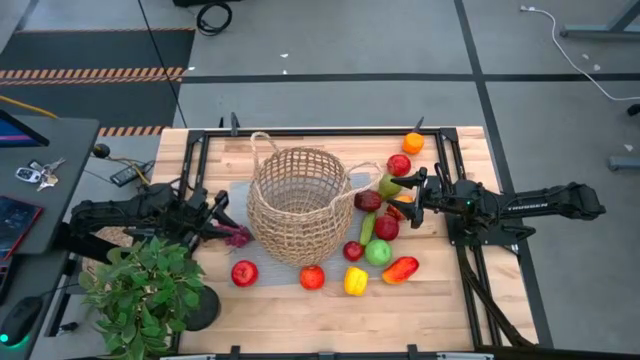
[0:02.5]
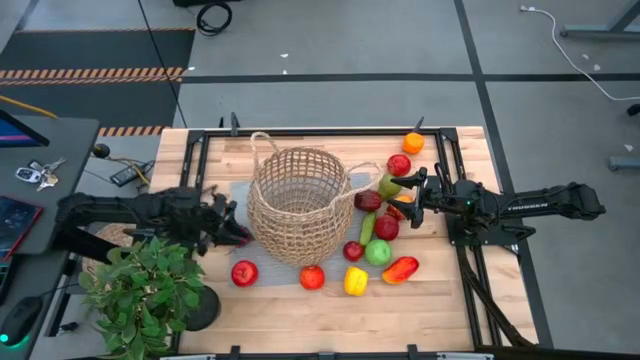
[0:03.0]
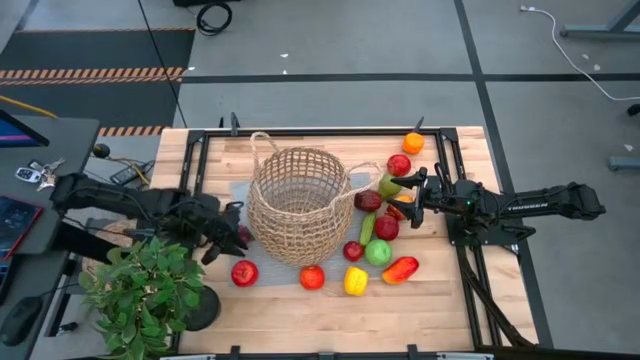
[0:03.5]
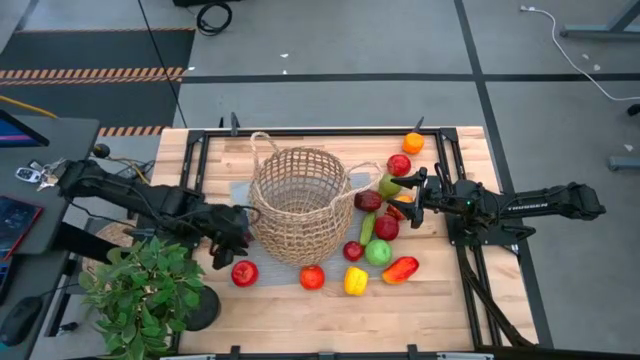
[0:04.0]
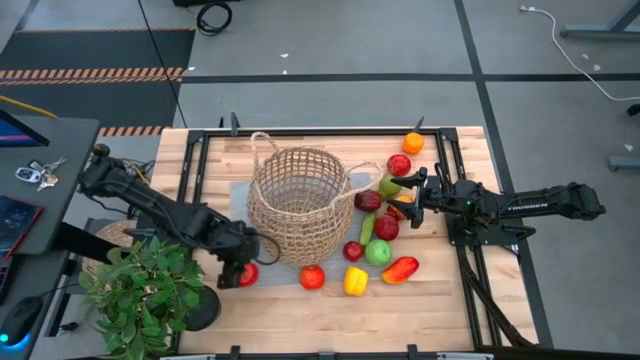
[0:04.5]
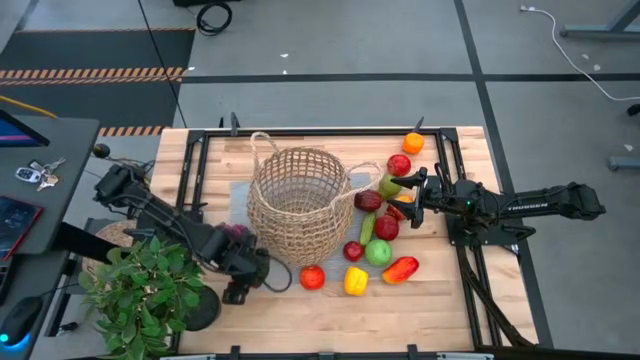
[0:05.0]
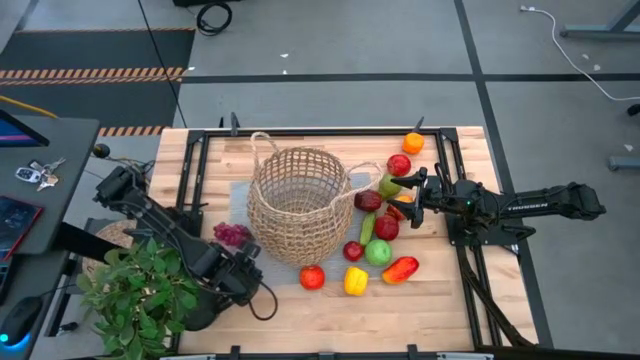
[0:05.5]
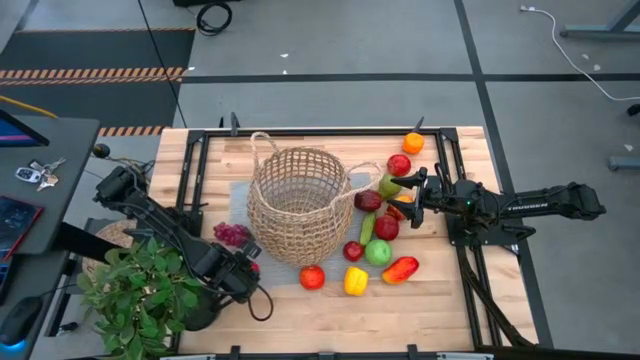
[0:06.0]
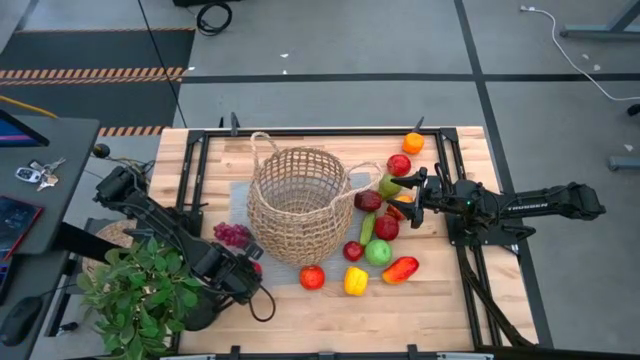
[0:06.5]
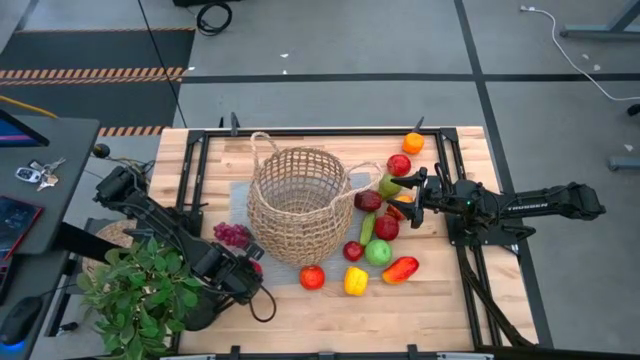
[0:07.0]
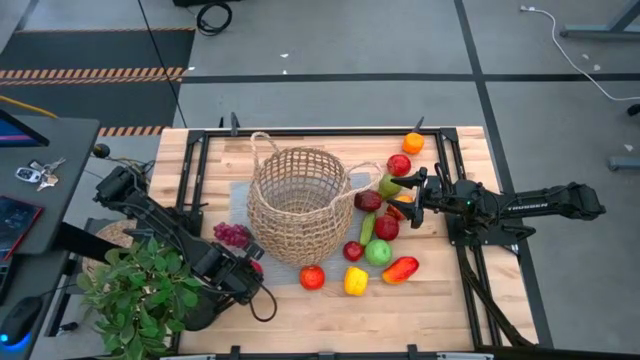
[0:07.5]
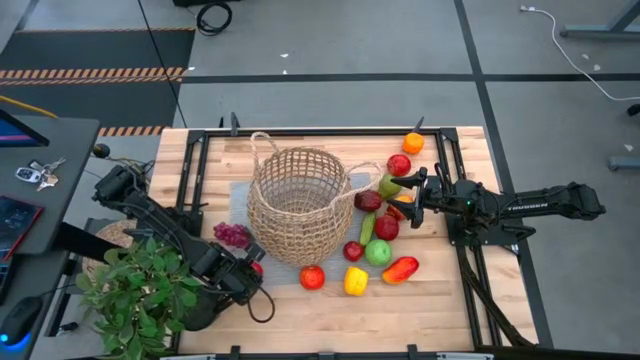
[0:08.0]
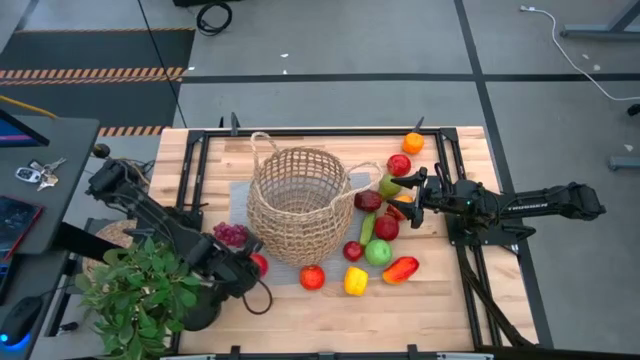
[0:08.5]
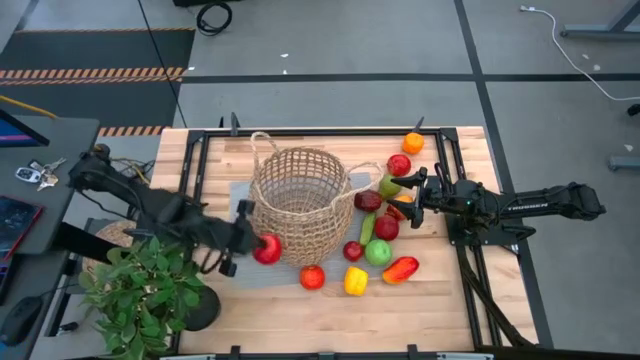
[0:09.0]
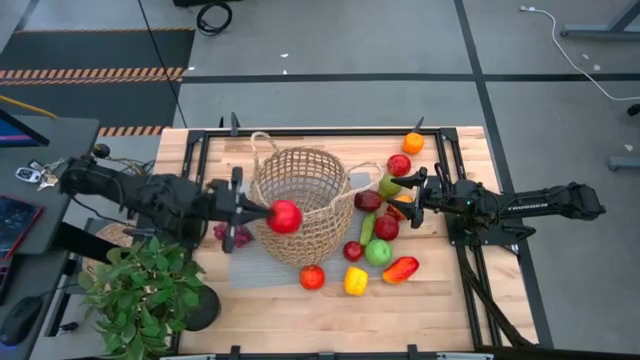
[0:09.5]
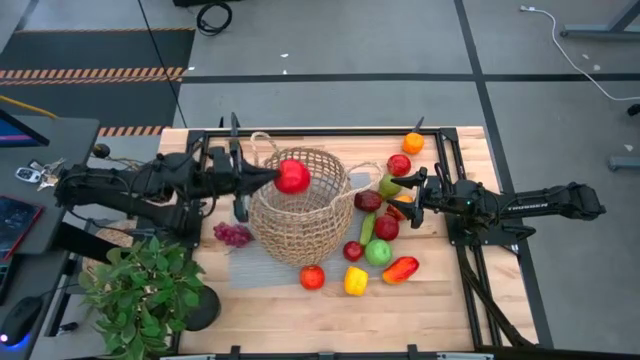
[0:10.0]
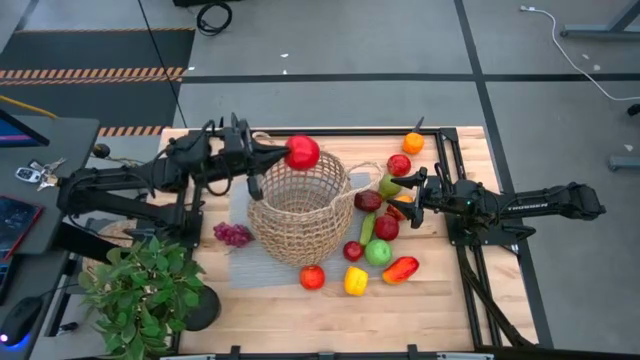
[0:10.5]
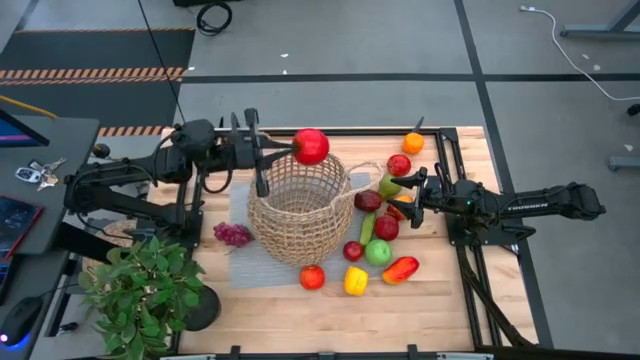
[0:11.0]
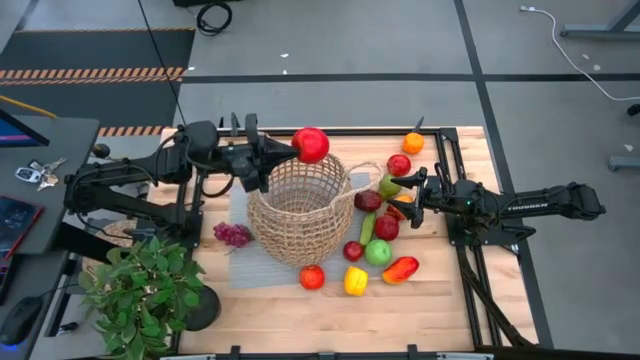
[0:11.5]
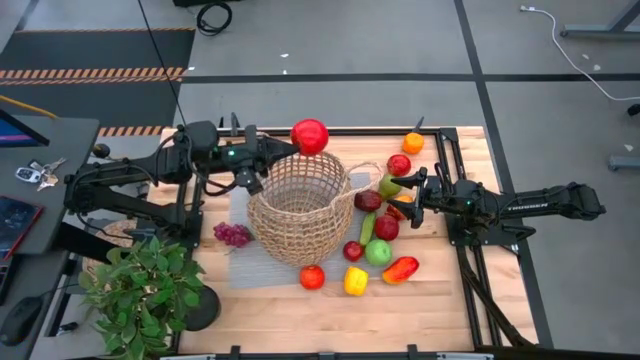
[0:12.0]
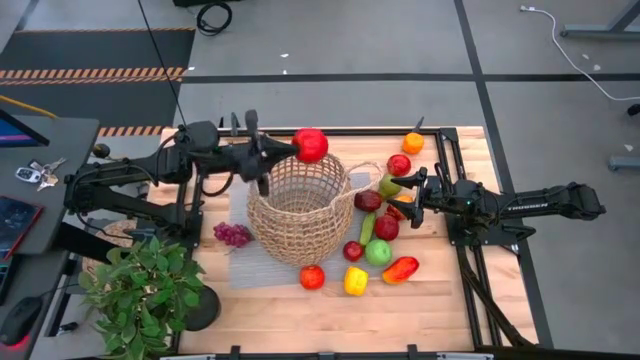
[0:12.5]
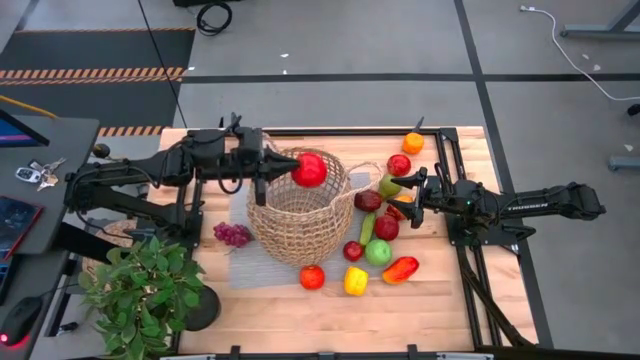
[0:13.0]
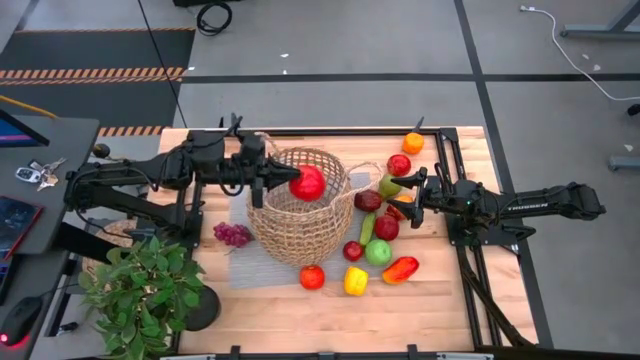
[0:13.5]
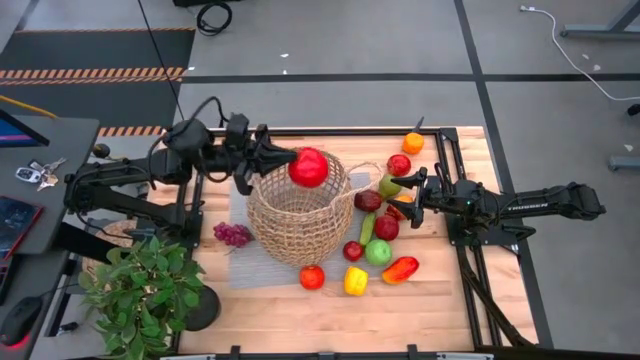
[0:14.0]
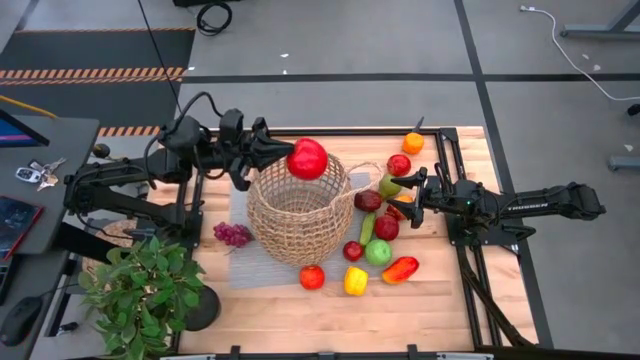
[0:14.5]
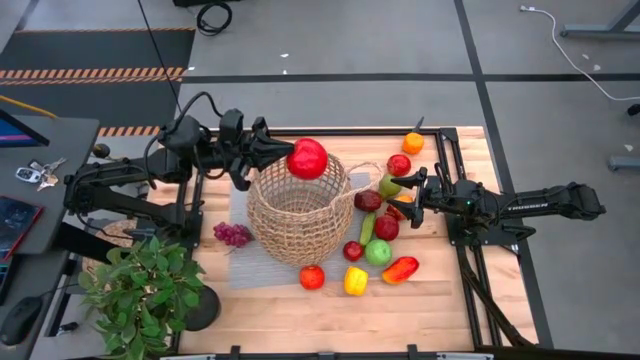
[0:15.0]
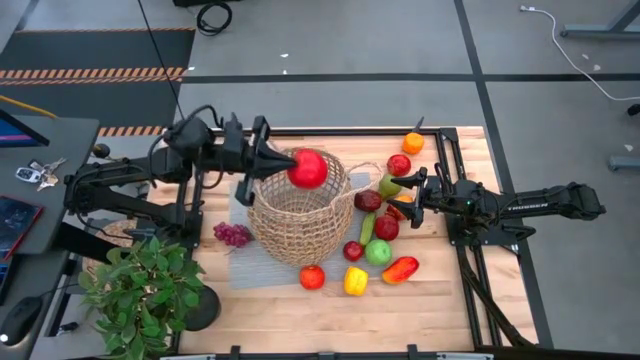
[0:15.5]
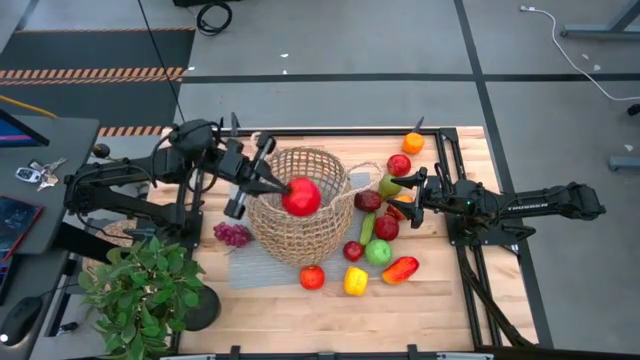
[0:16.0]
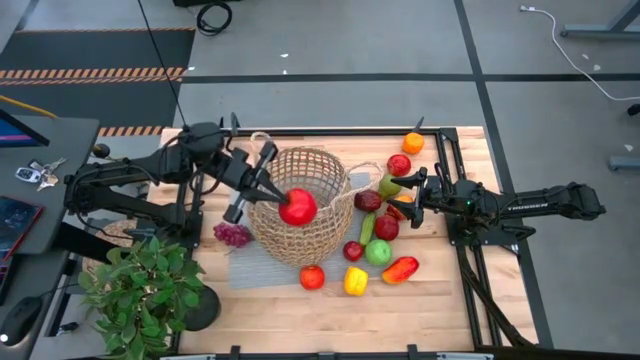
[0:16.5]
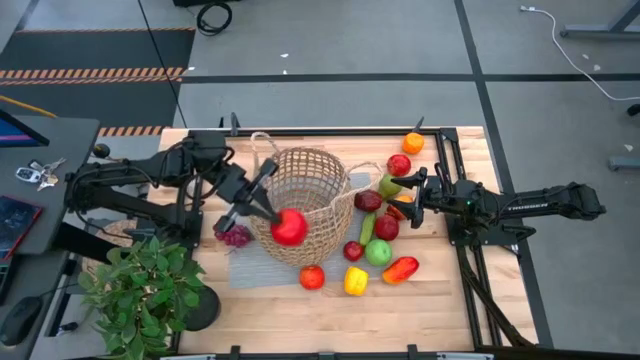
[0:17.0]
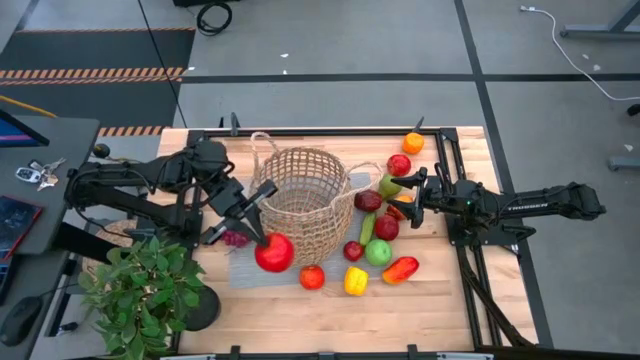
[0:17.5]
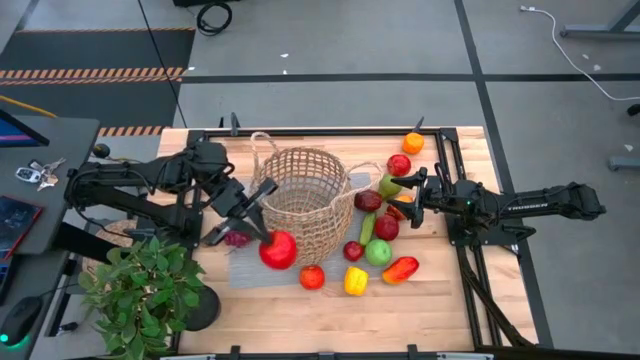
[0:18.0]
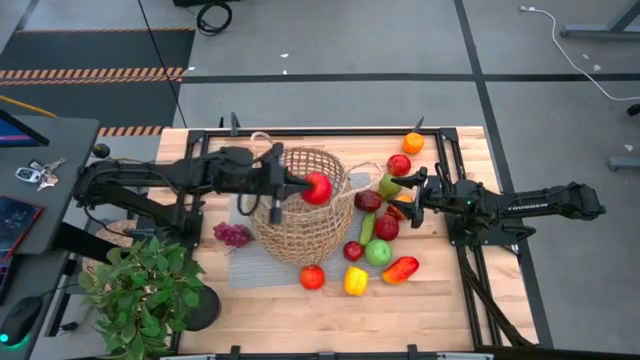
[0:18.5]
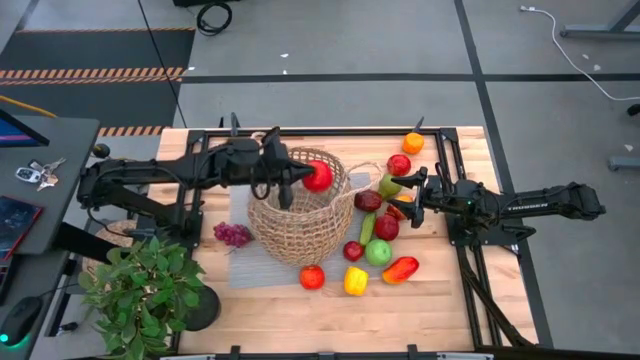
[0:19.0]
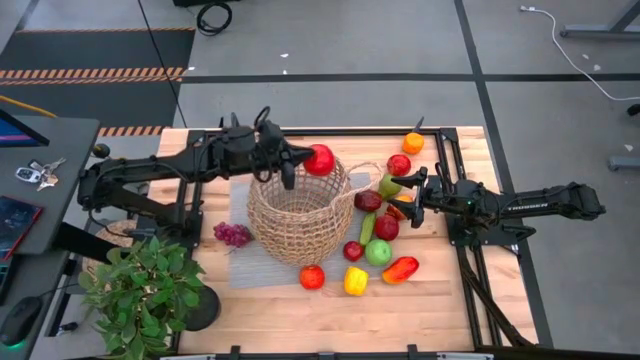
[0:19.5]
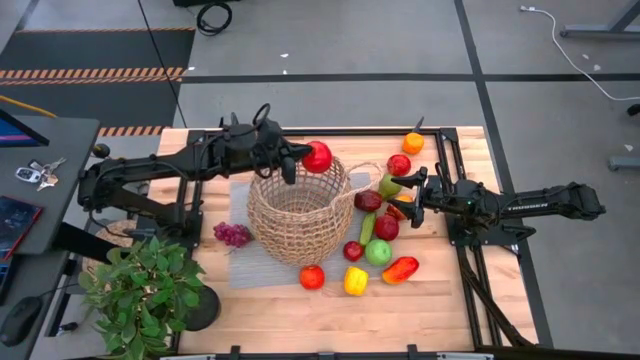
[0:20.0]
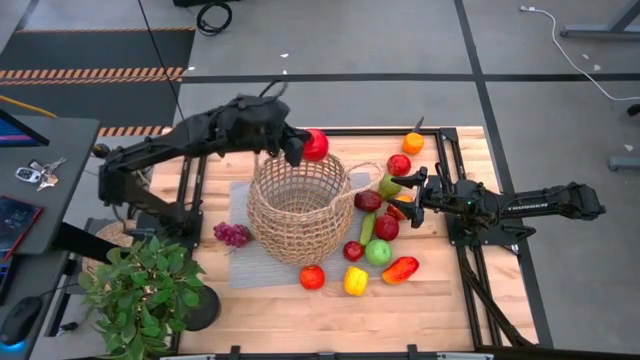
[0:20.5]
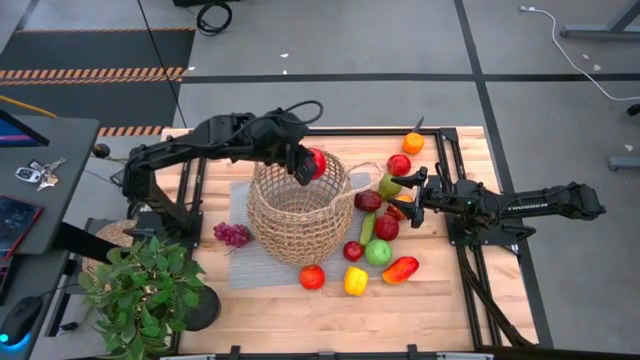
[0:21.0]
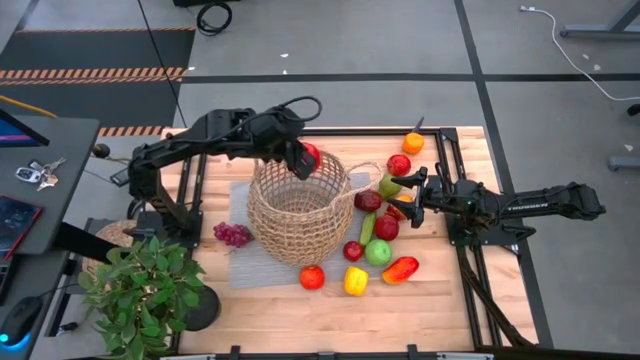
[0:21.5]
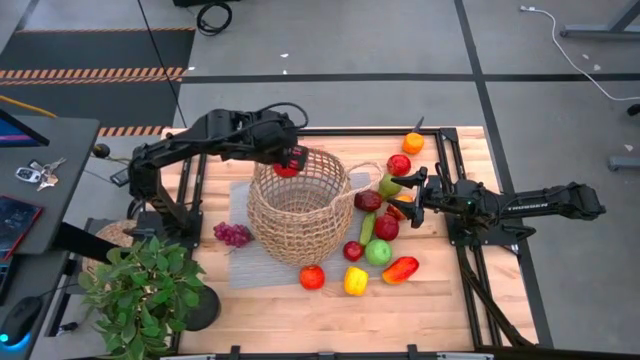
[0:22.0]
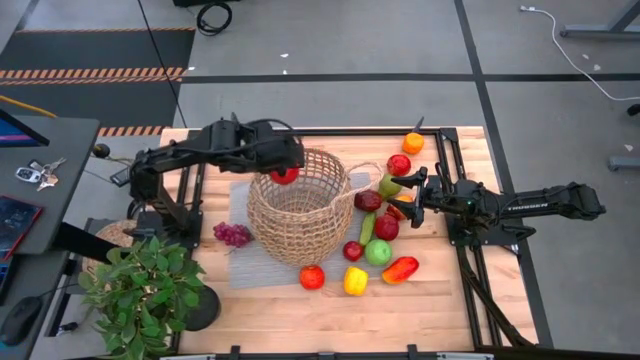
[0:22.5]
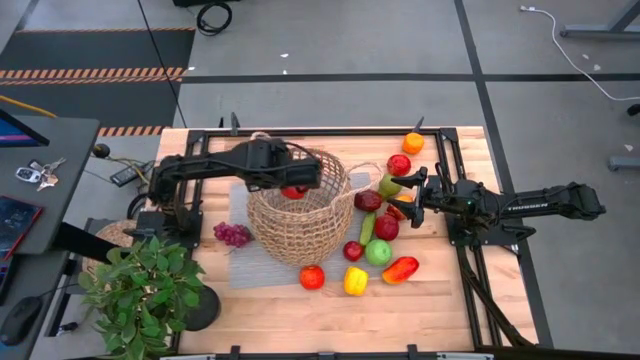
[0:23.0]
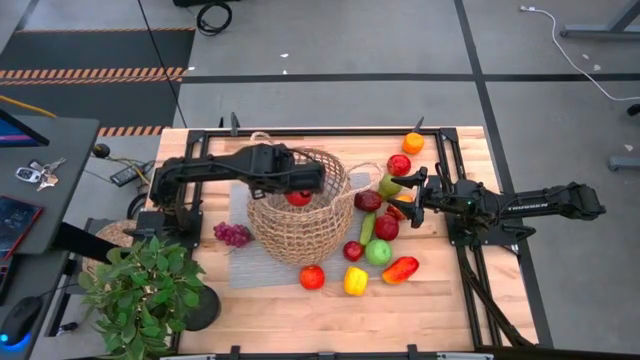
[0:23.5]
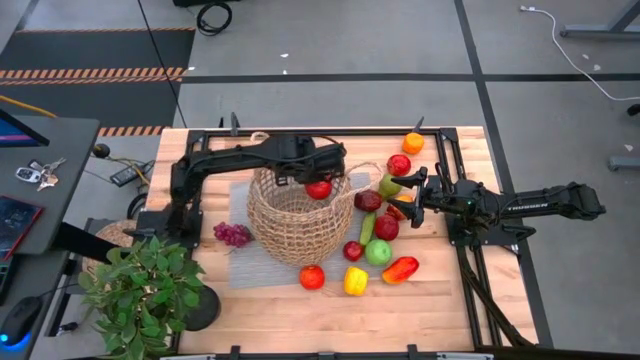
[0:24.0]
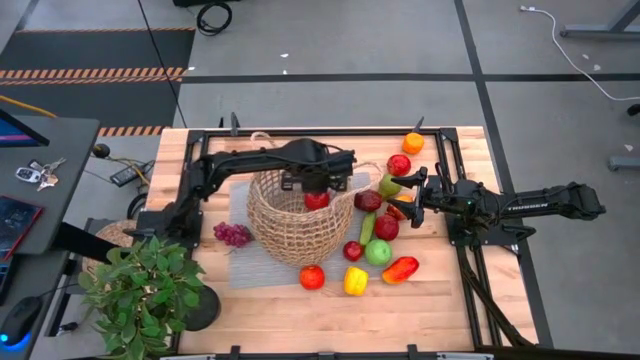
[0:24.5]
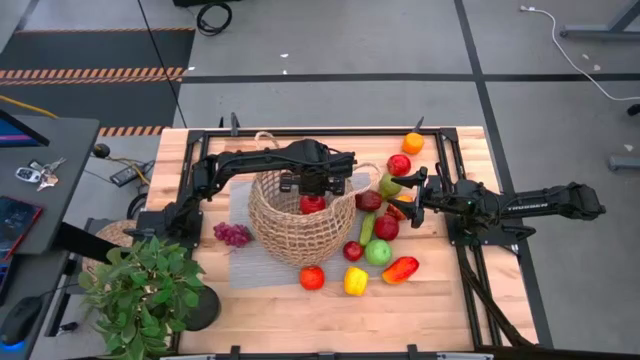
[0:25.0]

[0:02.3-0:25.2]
Task: Build produce basket
Put the red apple into the brown basket
